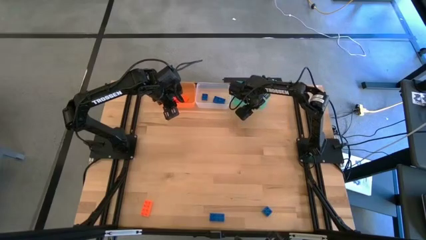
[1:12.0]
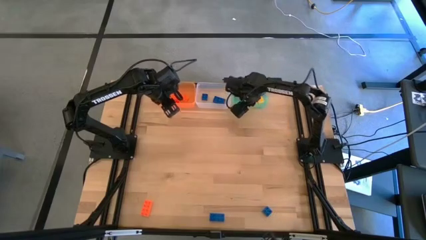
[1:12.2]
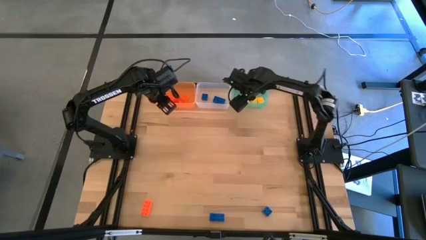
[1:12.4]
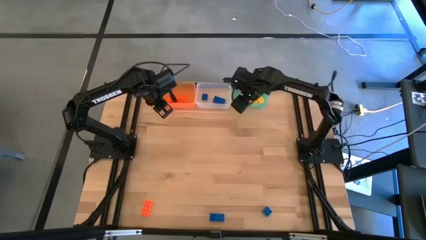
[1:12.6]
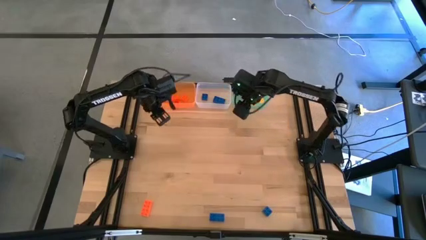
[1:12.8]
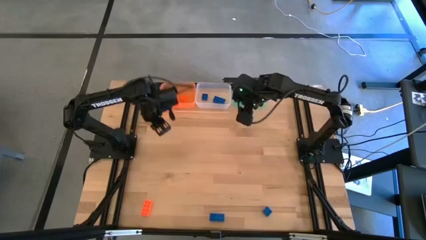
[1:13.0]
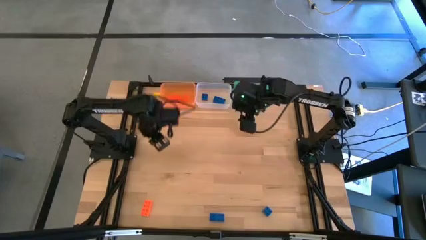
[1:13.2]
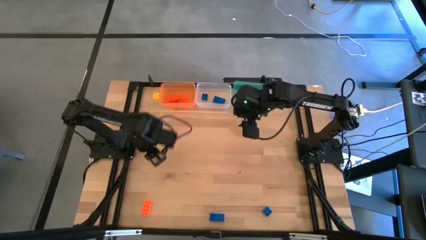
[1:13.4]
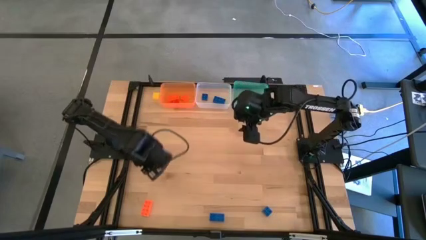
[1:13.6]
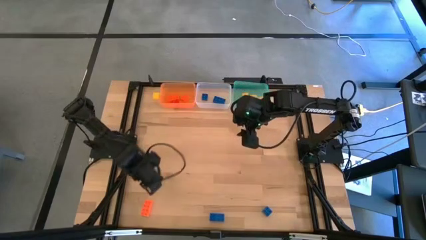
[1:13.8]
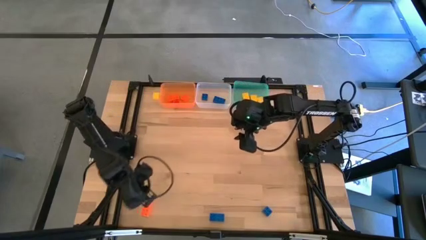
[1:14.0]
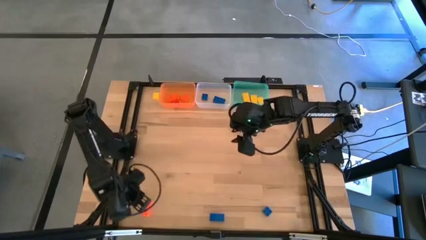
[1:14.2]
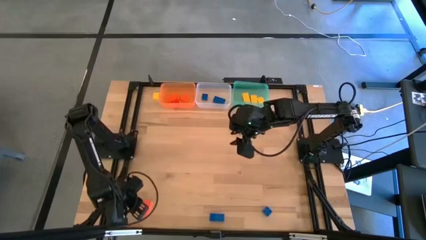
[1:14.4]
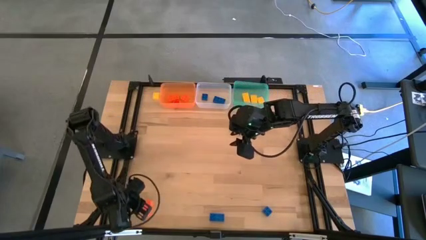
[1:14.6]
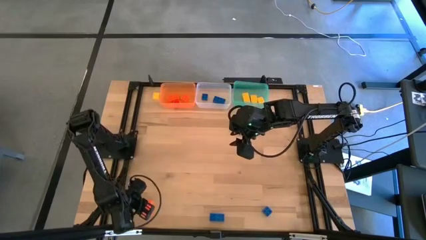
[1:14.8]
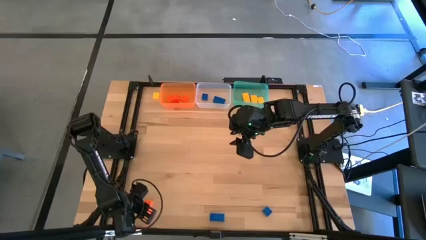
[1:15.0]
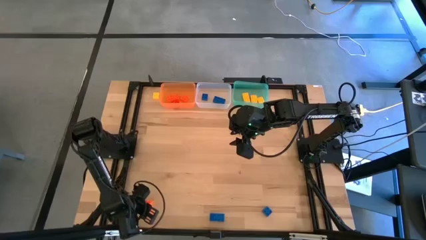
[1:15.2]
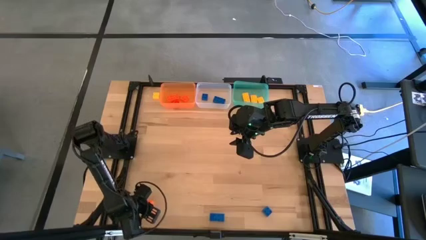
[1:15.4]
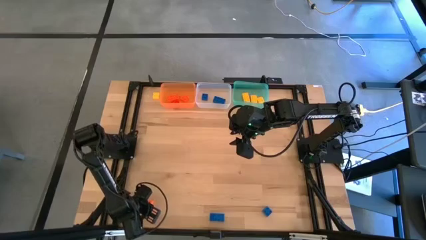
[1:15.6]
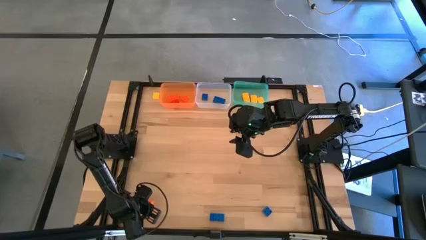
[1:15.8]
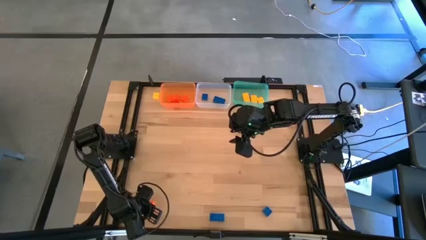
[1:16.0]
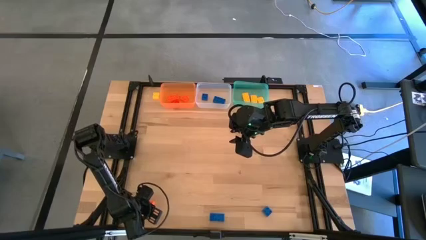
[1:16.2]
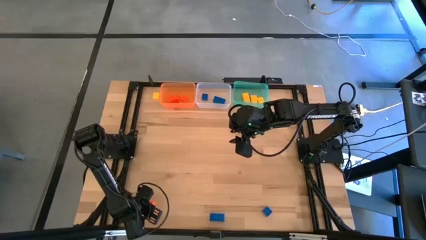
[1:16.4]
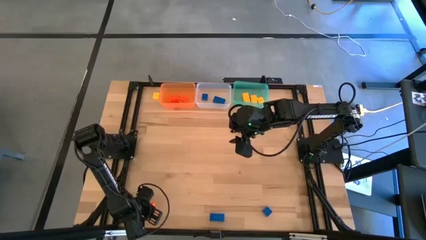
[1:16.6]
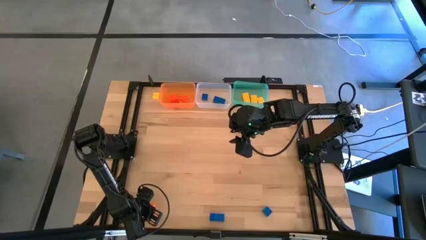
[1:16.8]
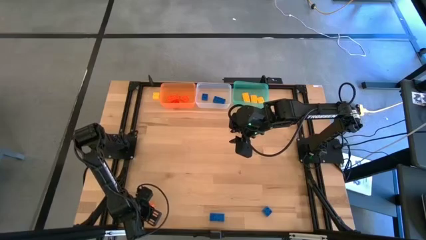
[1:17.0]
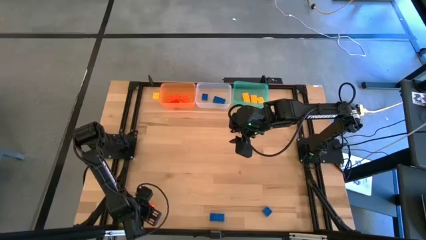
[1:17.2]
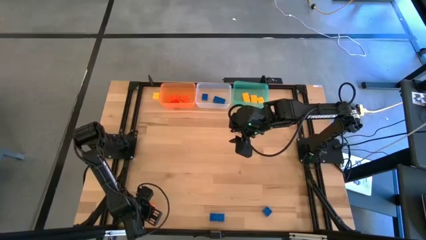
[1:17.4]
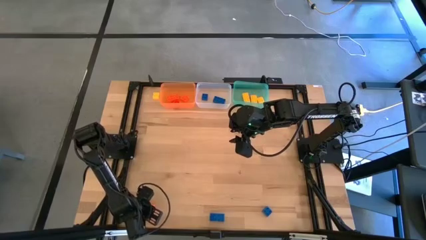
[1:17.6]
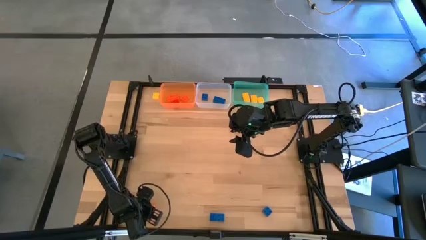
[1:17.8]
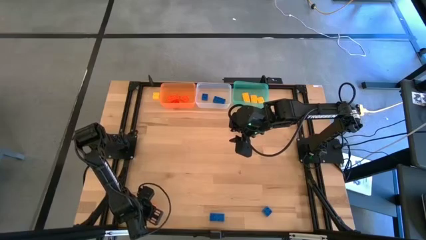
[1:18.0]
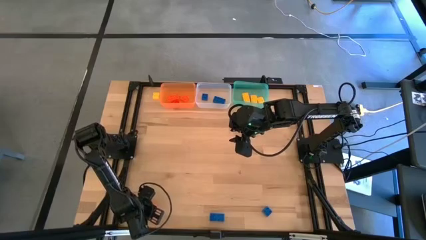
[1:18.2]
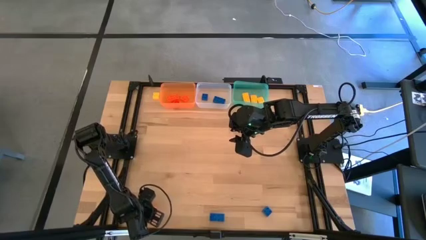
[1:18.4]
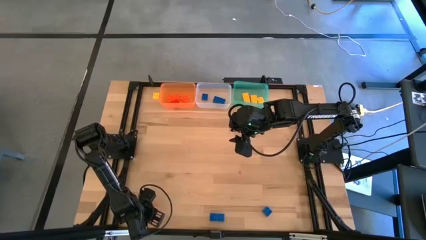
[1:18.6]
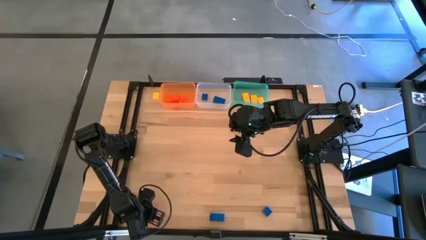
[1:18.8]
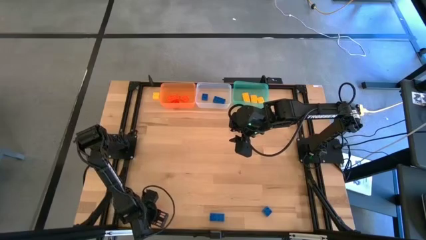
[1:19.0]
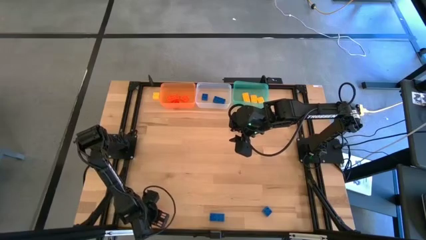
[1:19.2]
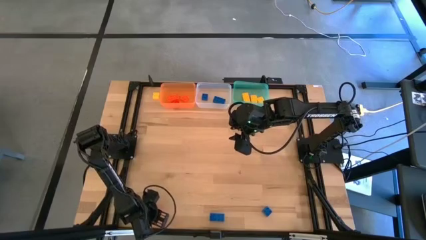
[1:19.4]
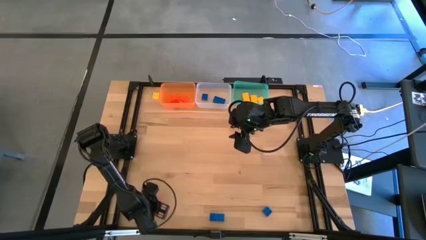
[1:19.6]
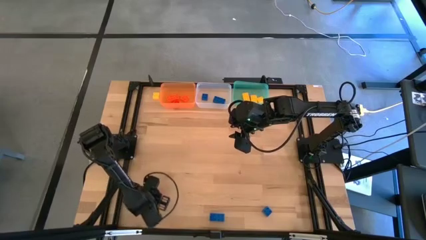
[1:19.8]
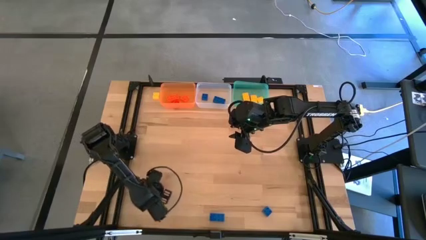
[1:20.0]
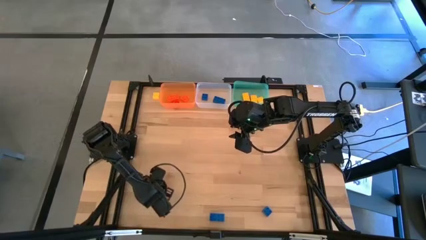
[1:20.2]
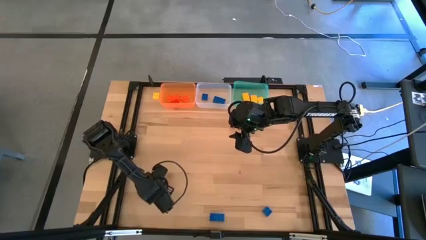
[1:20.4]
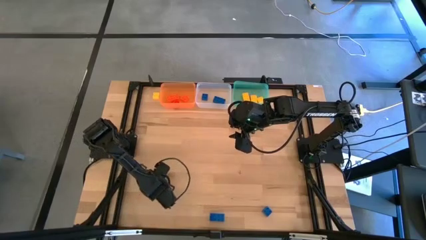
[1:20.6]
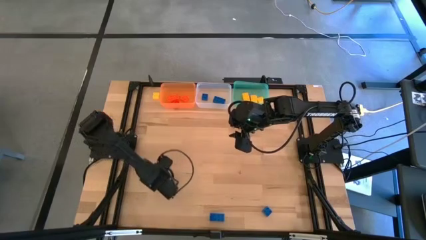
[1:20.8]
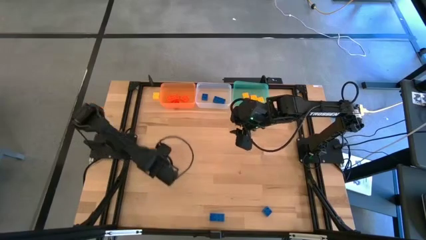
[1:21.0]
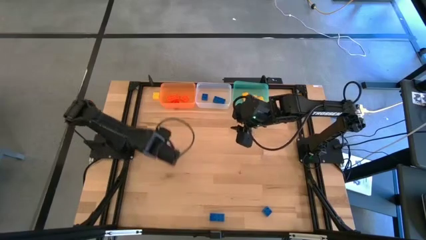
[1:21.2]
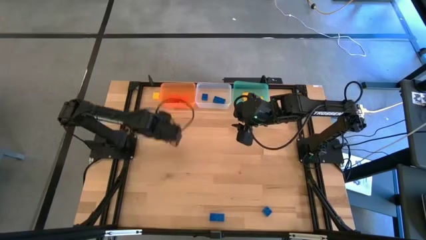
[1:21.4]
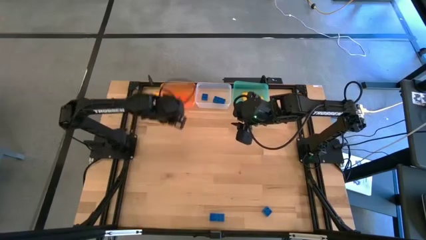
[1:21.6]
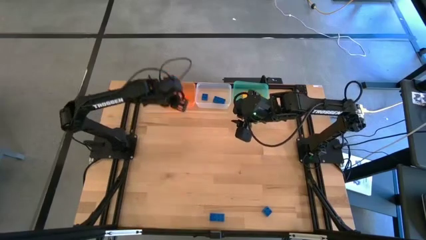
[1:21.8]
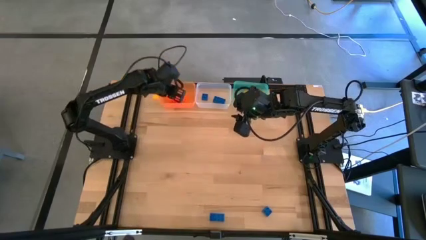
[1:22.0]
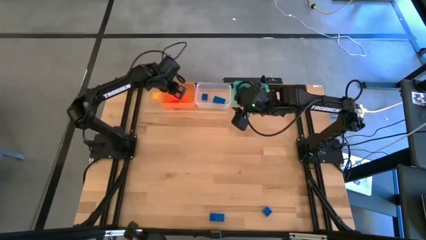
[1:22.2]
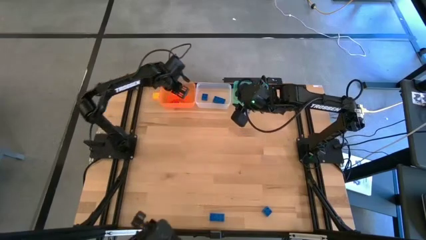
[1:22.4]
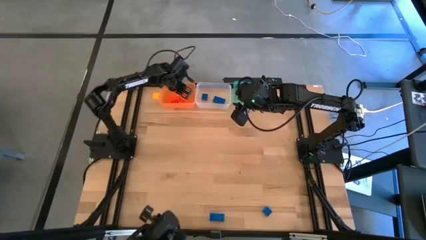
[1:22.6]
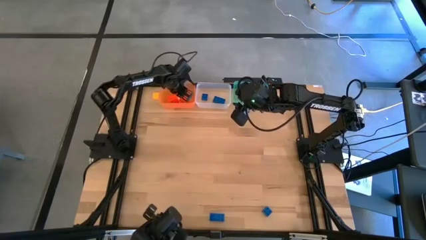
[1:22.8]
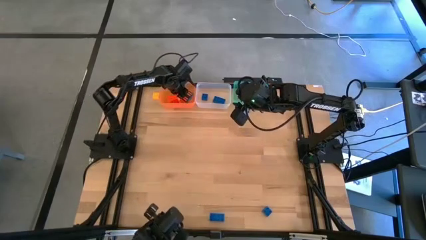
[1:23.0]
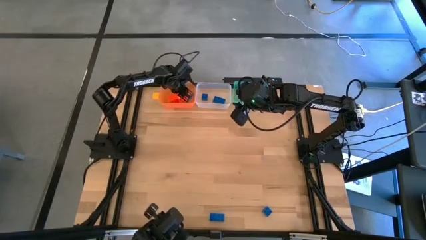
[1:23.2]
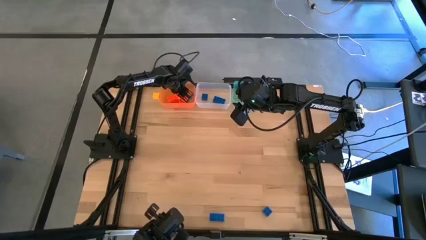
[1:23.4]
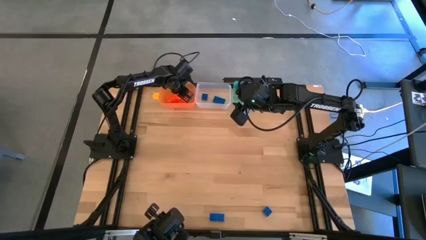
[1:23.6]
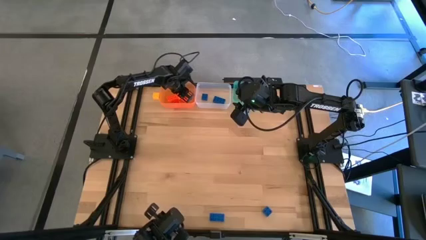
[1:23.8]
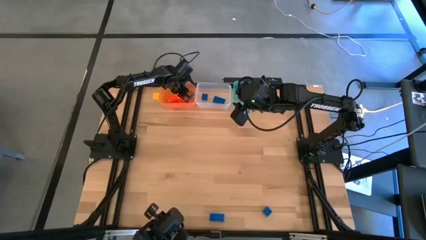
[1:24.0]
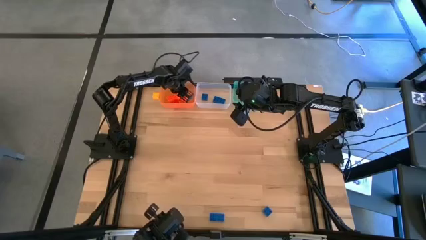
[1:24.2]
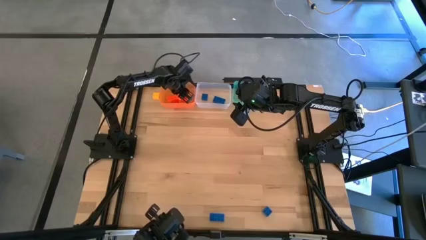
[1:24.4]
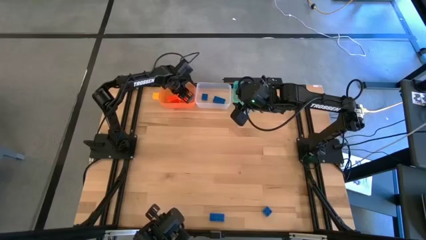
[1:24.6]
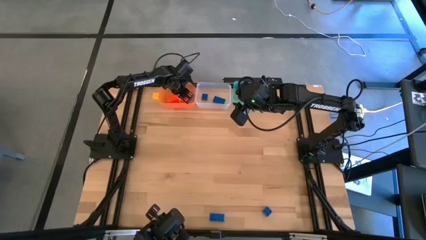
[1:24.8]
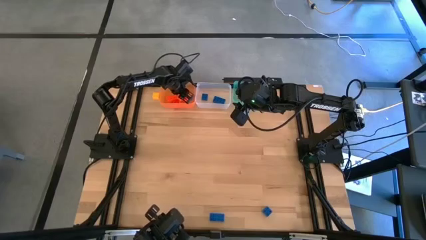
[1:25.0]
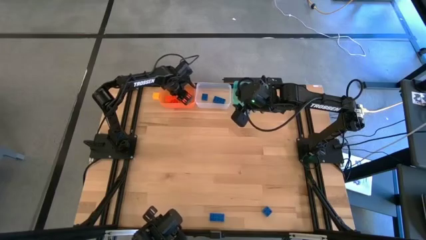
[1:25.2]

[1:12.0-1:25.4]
Task: Sort & place blocks by color
Put the orange game piece into the orange bin
